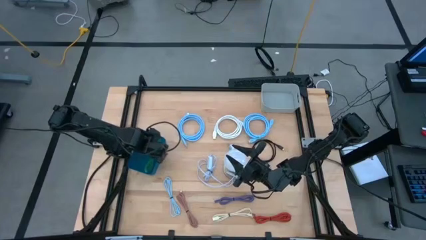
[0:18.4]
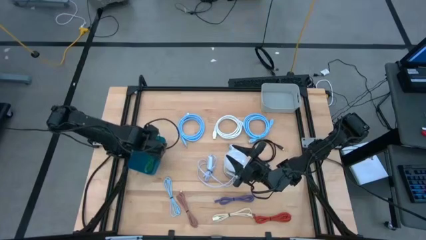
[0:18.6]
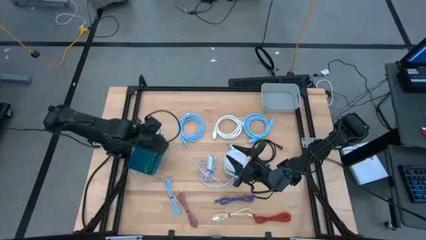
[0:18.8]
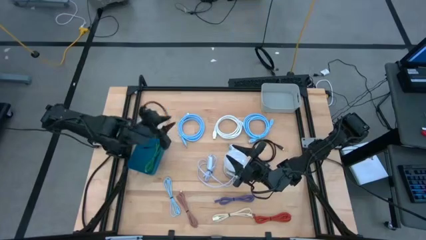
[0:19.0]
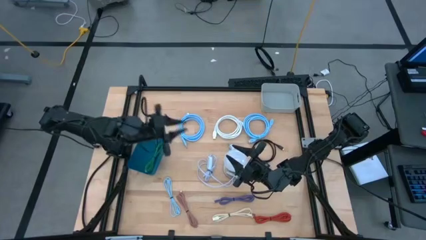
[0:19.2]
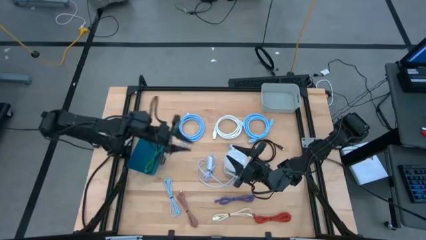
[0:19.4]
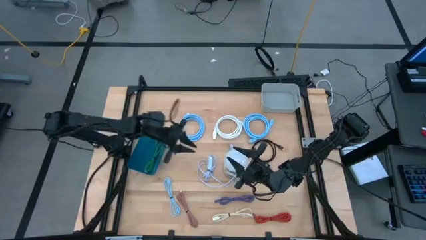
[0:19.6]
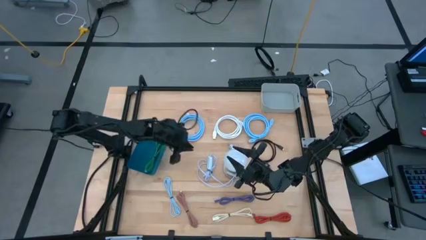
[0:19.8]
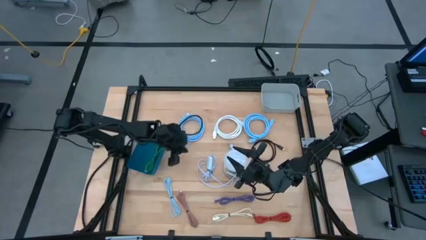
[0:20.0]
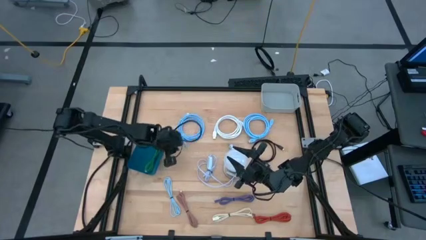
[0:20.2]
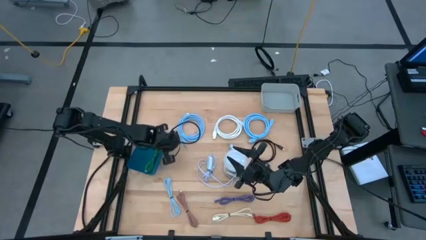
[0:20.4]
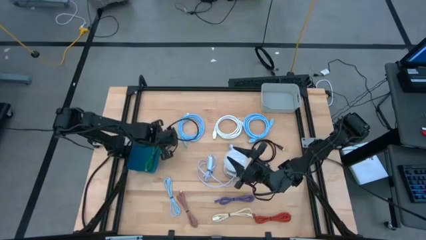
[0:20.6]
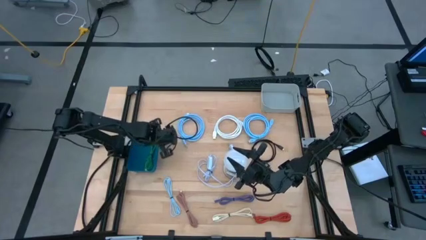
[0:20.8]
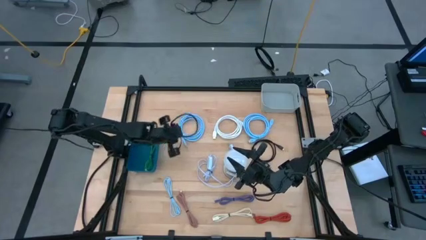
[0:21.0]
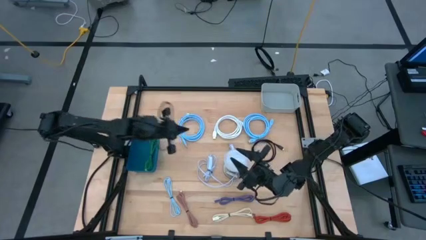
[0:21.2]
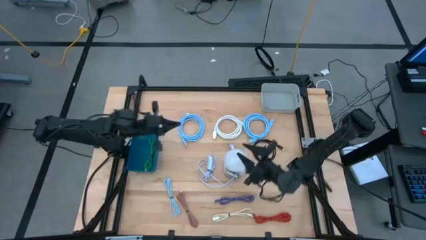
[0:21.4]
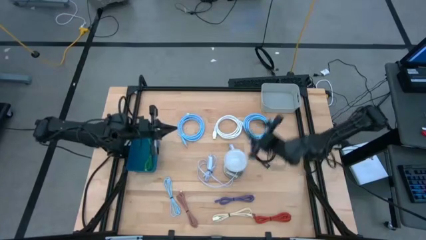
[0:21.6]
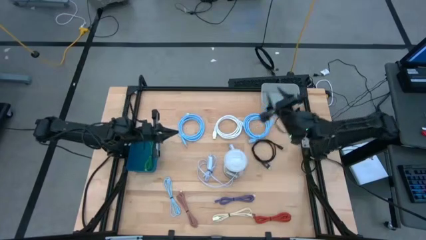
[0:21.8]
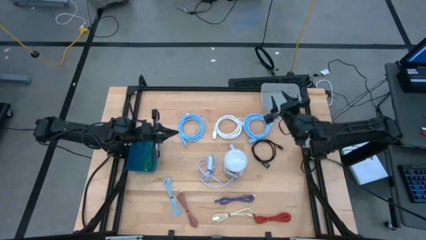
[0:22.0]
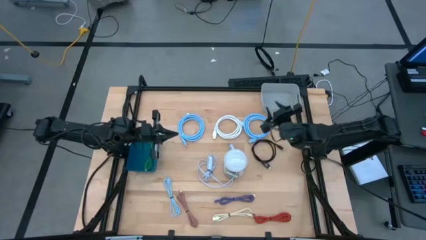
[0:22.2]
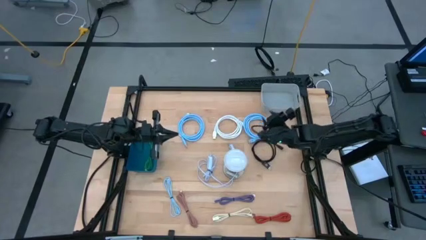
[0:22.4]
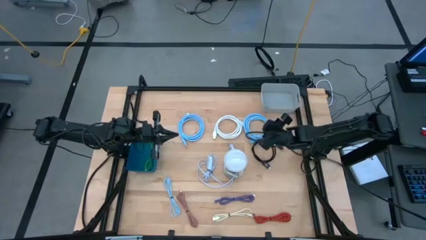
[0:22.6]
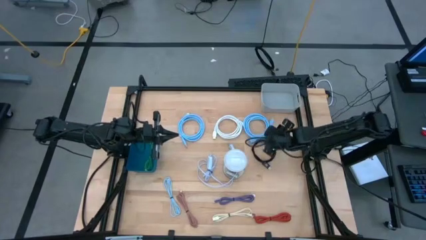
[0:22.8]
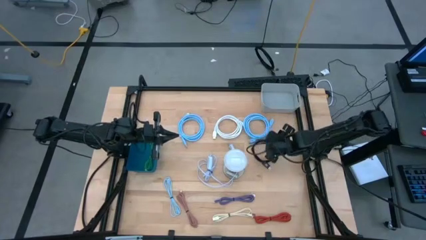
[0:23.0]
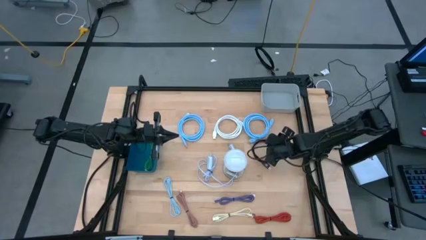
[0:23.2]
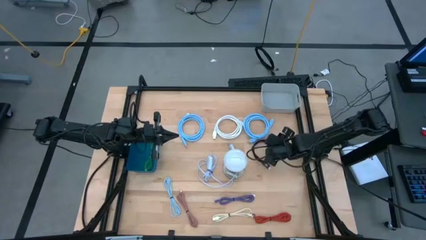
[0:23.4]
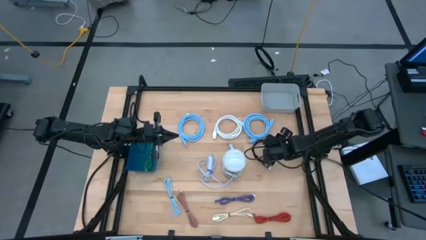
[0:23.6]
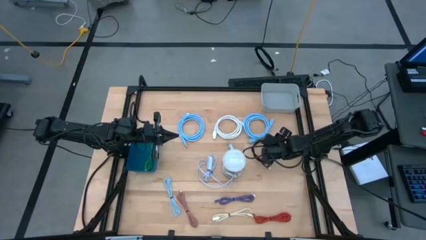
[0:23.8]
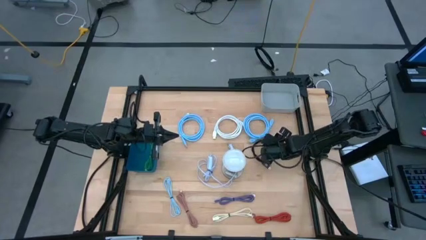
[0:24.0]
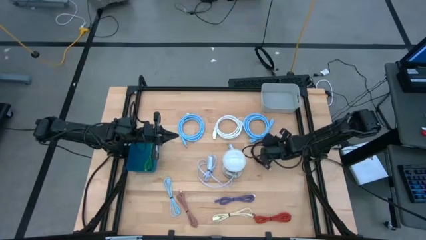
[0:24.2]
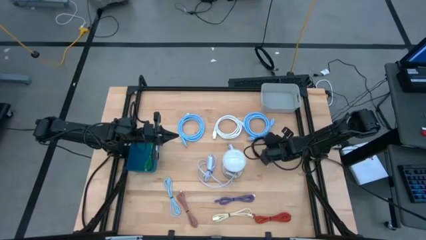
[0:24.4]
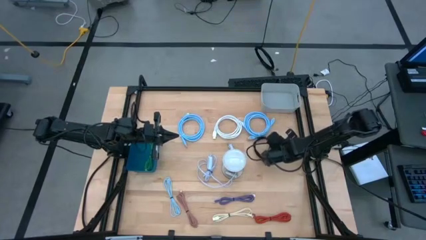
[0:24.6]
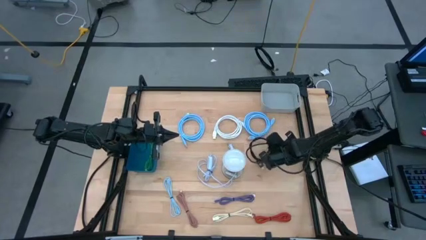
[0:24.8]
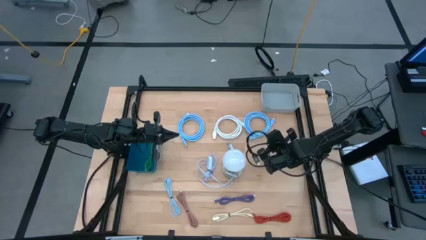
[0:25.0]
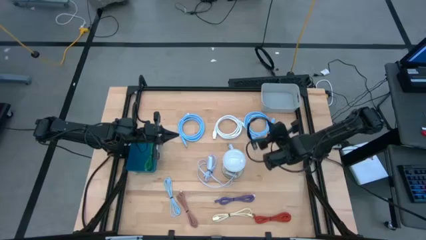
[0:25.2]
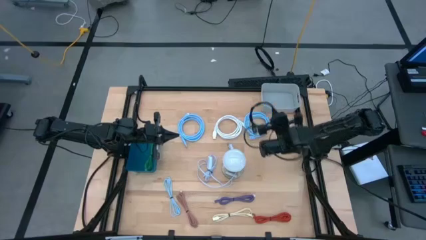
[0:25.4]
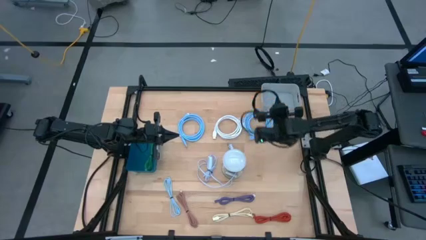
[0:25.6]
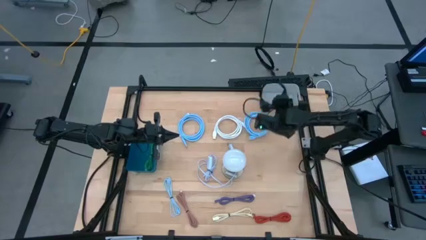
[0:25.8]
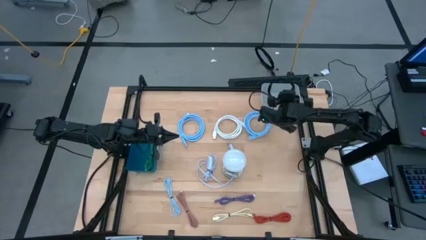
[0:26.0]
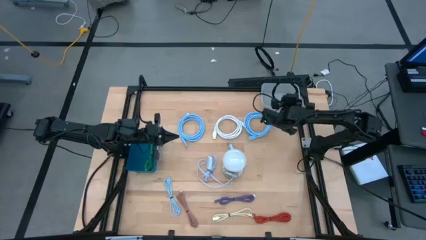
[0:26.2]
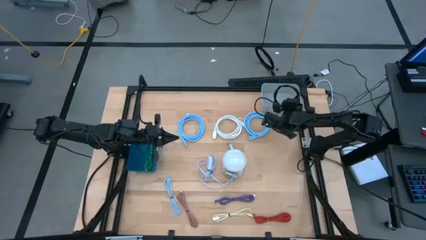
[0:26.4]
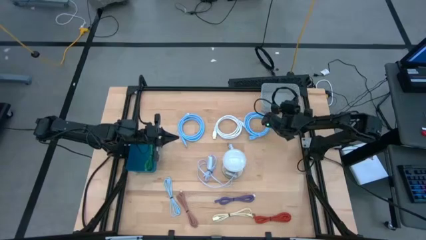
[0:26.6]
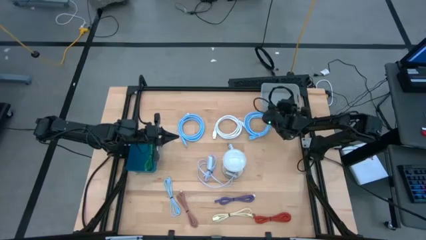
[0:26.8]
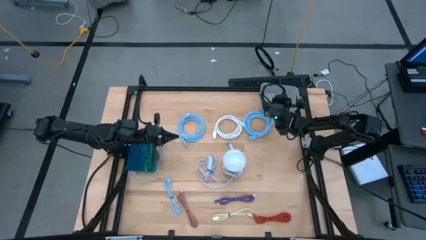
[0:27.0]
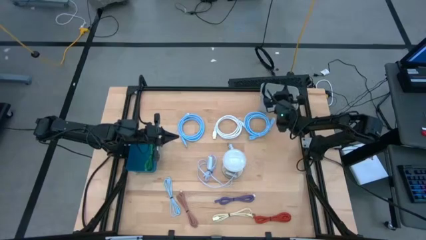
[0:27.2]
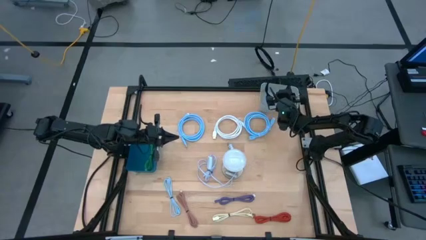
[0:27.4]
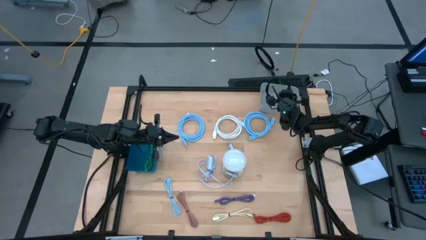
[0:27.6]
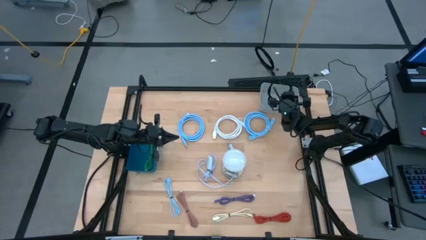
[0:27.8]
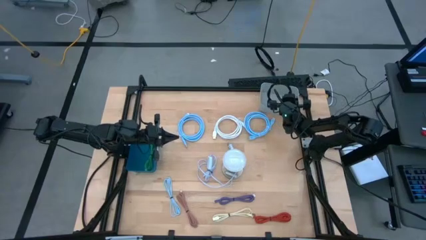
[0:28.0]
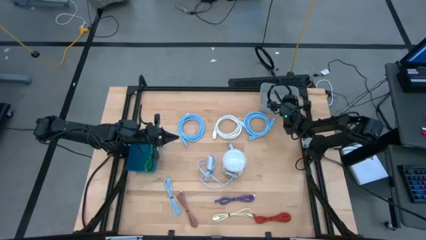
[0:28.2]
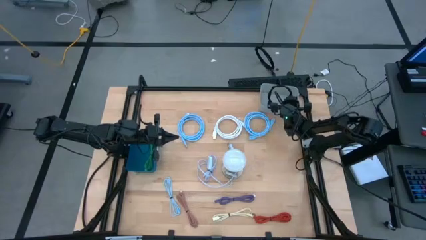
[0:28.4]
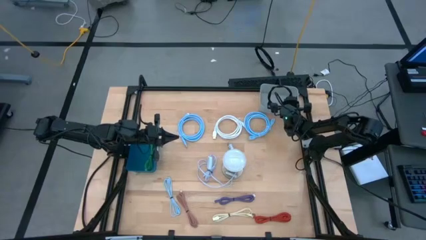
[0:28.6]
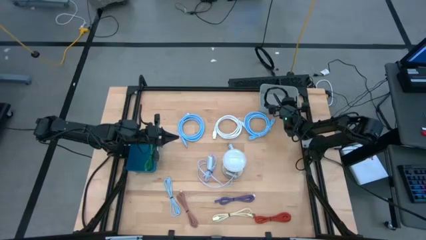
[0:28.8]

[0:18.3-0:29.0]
Task: Pick & Place USB Port
Put the black HDMI cable into the gray bin
